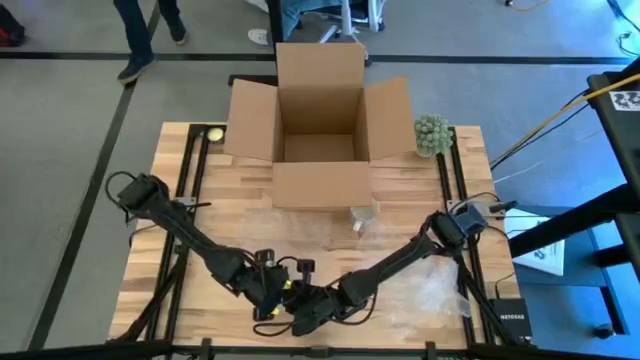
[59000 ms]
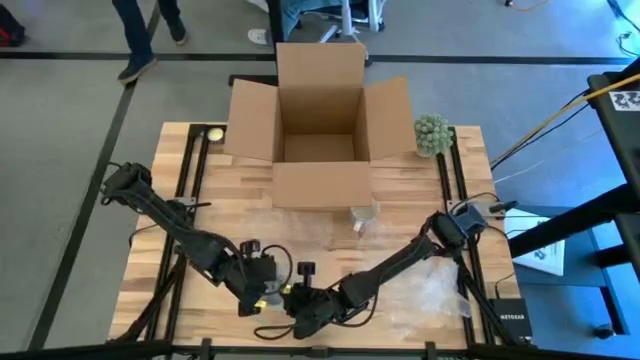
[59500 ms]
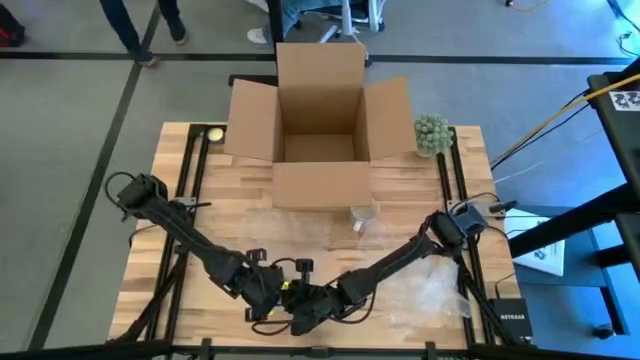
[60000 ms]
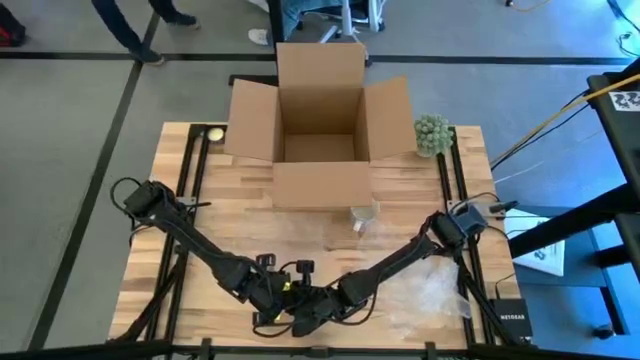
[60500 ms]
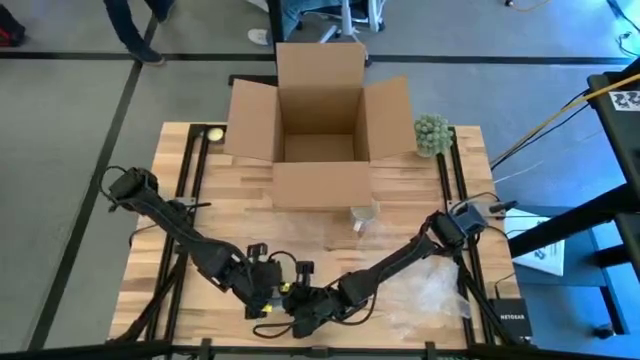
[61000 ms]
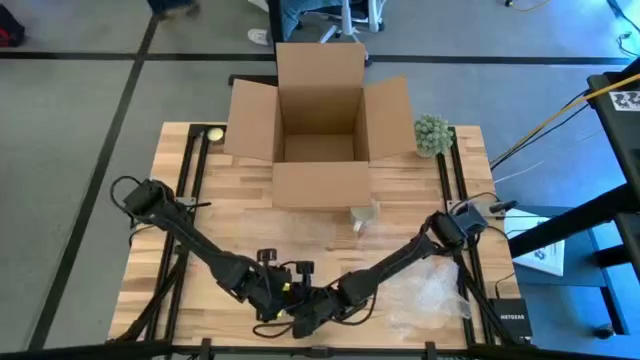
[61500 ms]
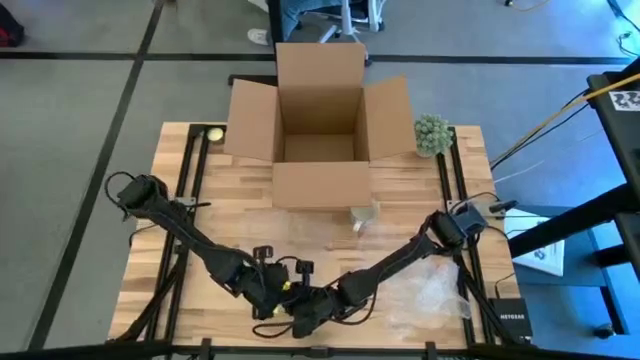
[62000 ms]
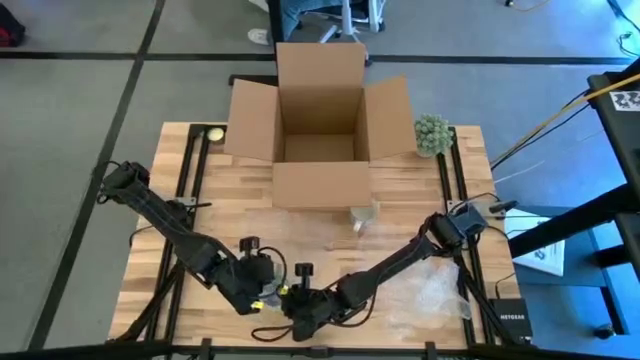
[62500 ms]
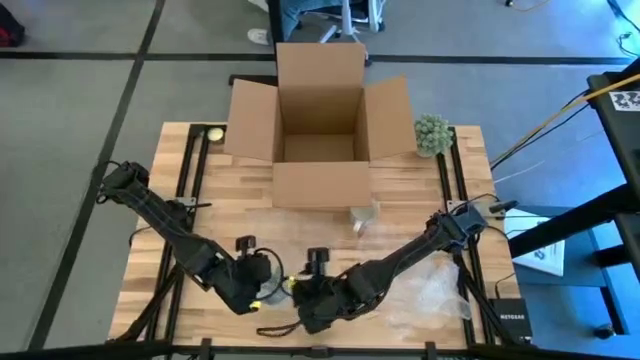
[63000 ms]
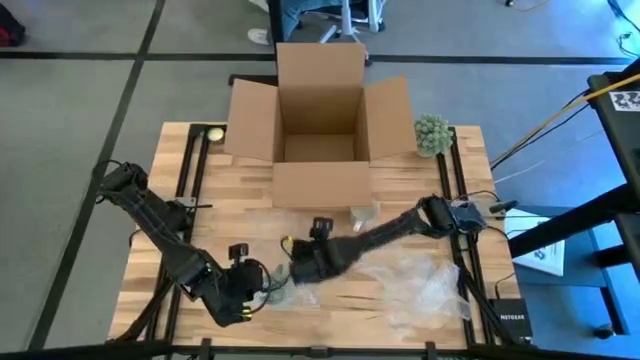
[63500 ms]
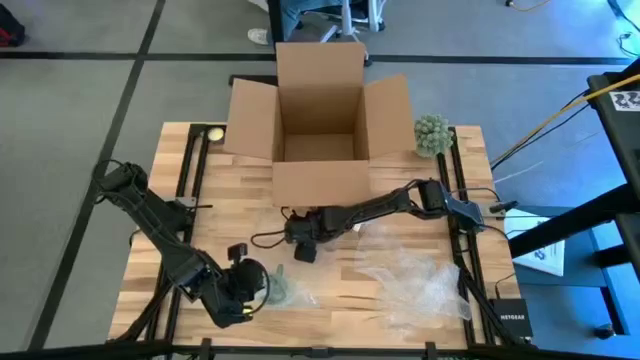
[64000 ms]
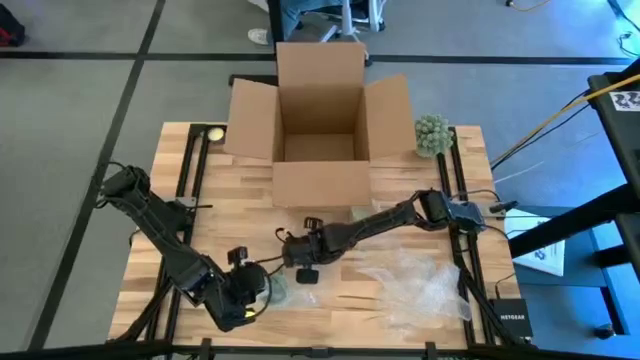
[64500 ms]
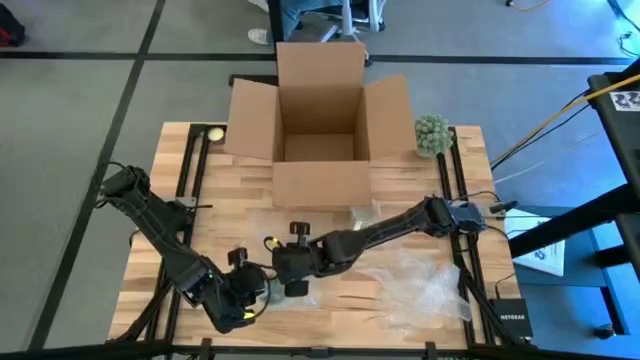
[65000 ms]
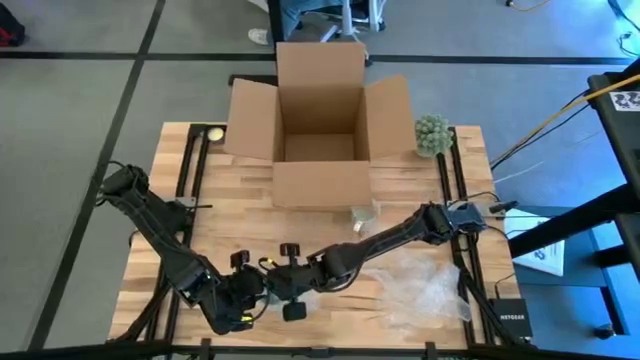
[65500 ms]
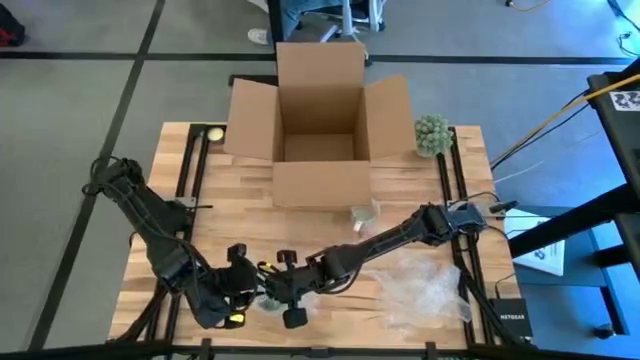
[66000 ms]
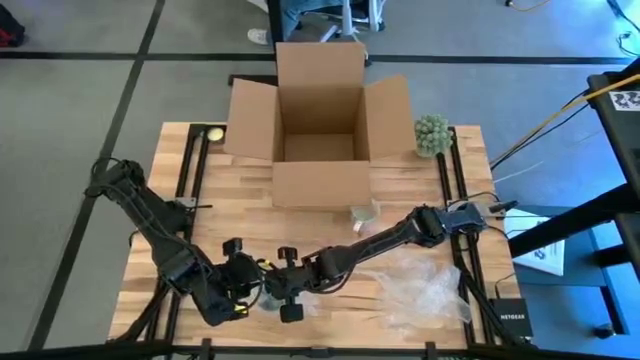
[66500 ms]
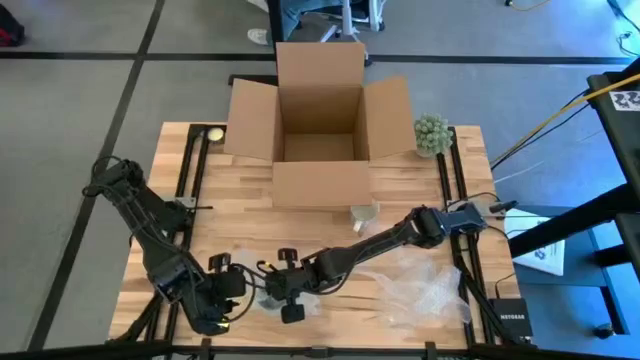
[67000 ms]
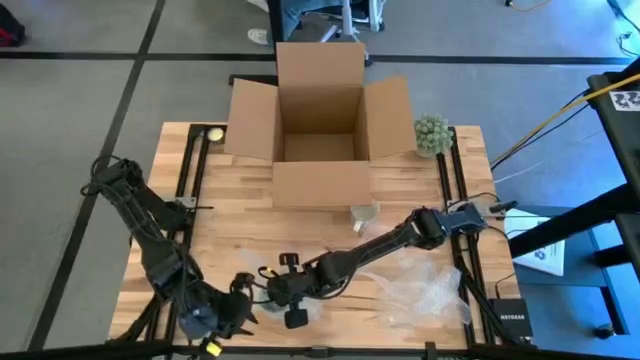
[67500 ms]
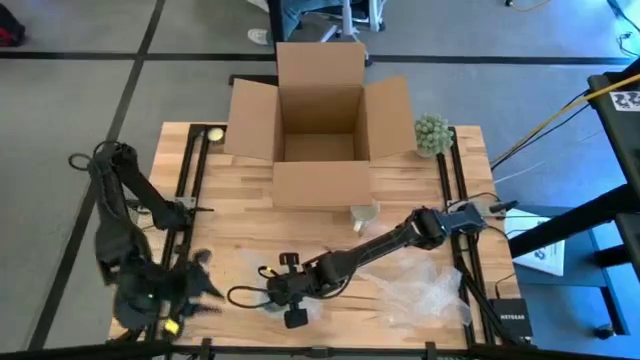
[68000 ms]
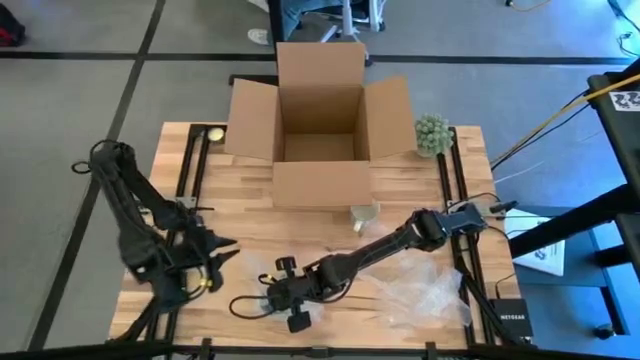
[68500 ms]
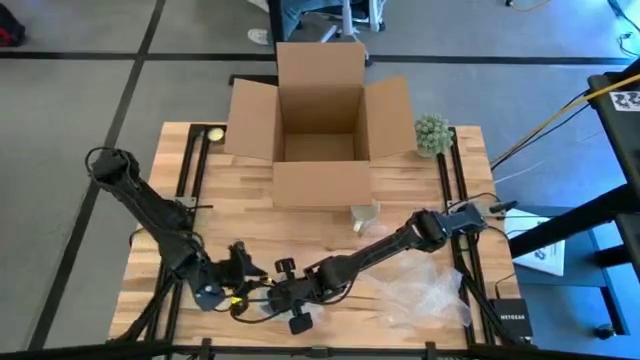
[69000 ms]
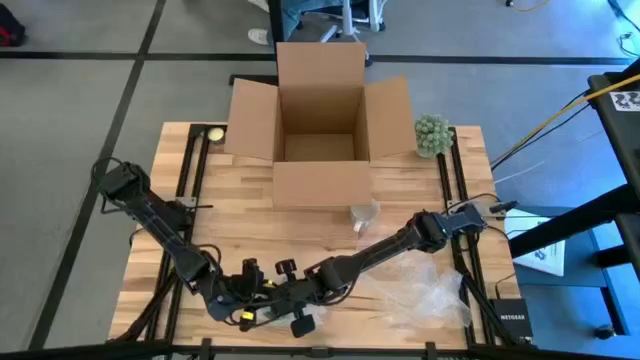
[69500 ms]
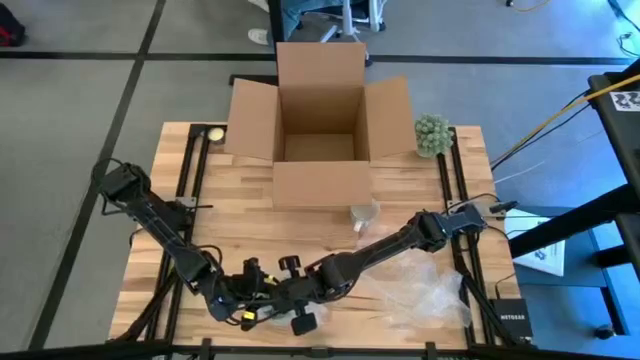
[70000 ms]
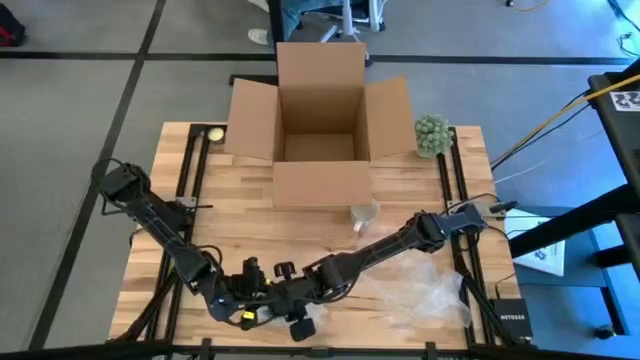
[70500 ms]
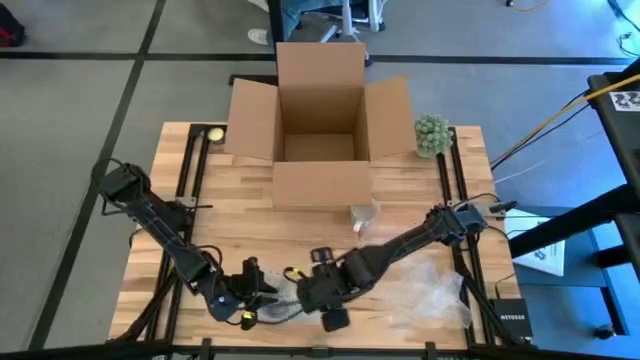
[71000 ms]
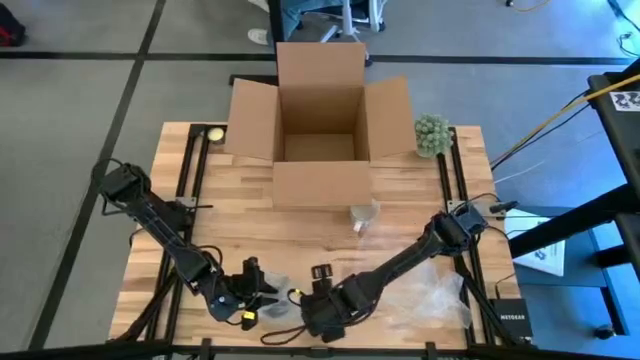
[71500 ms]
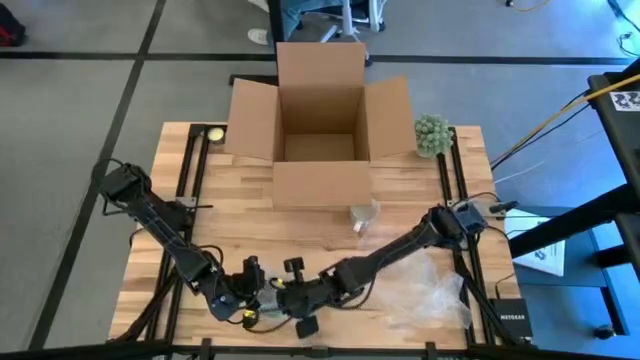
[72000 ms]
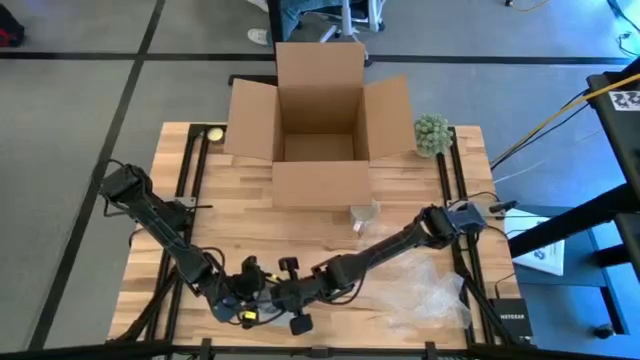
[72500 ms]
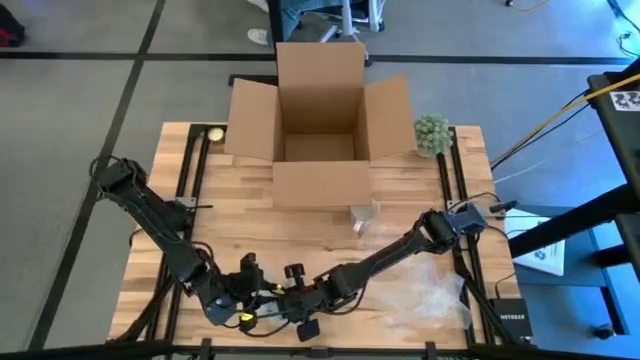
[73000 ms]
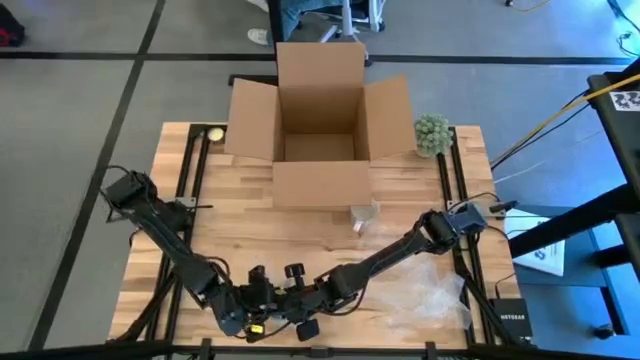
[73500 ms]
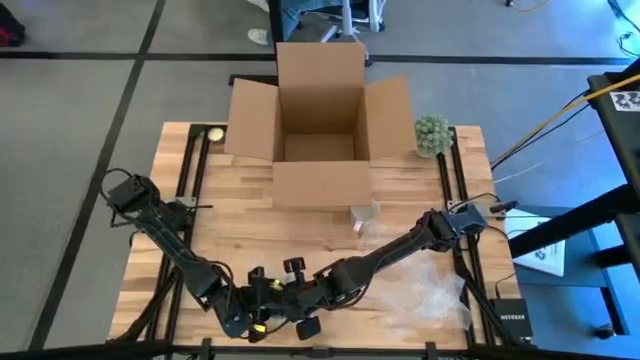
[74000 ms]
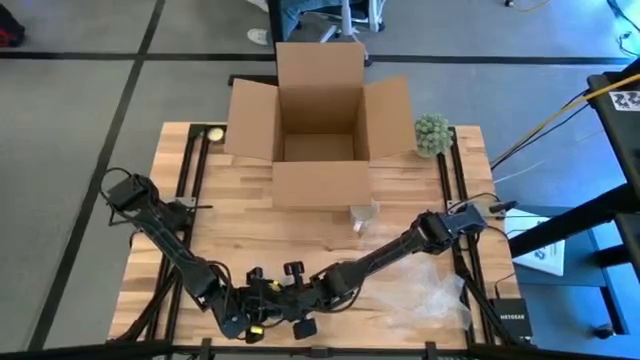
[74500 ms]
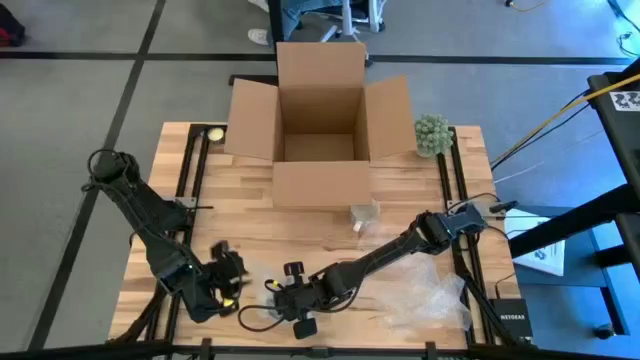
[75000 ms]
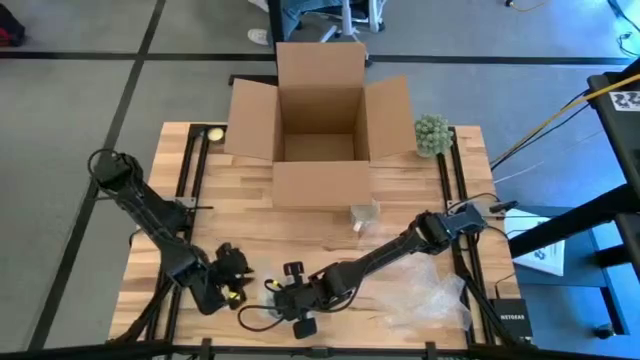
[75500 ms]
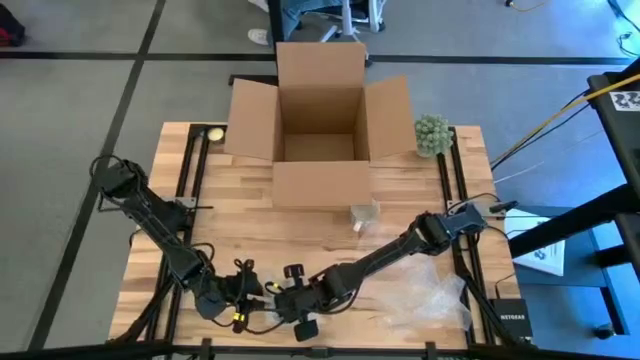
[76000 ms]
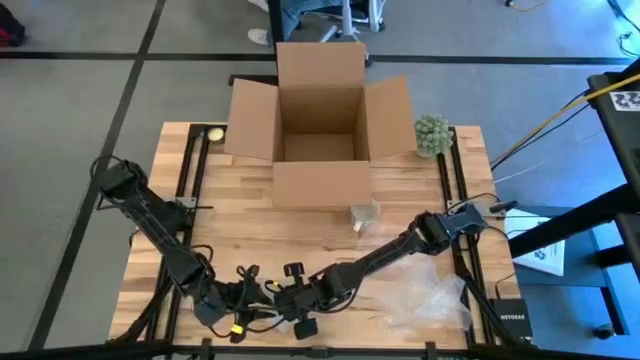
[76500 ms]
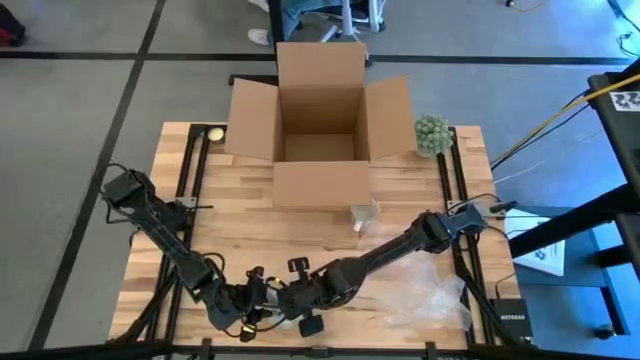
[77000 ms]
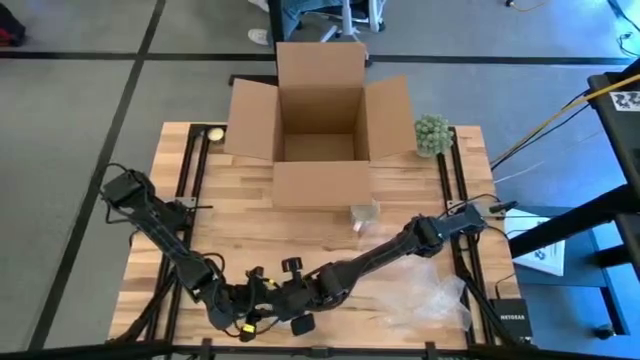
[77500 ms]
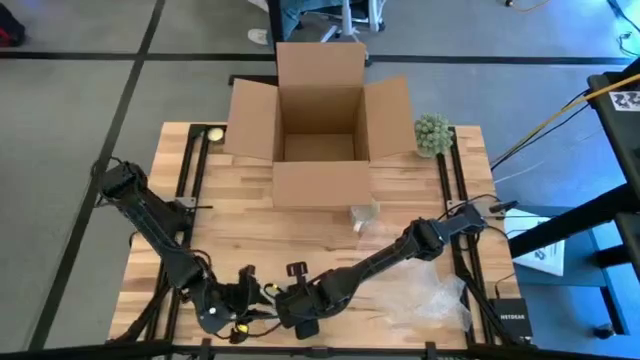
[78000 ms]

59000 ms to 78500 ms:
Task: wrap mug
Wrap the green mug with bubble wrap

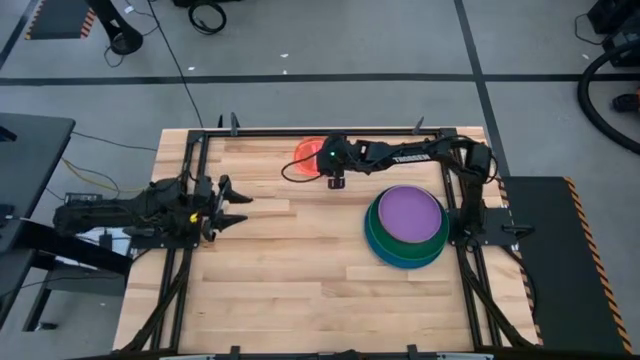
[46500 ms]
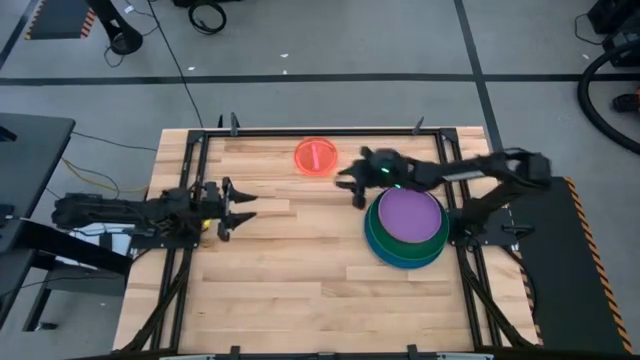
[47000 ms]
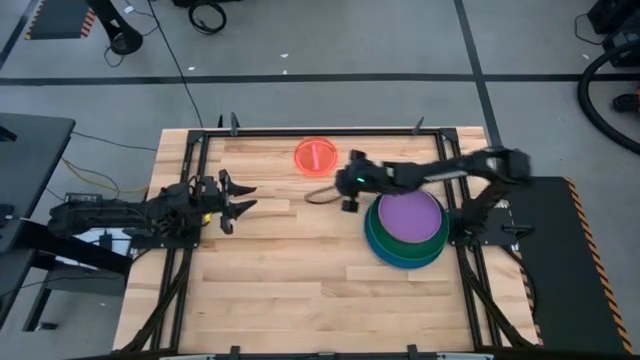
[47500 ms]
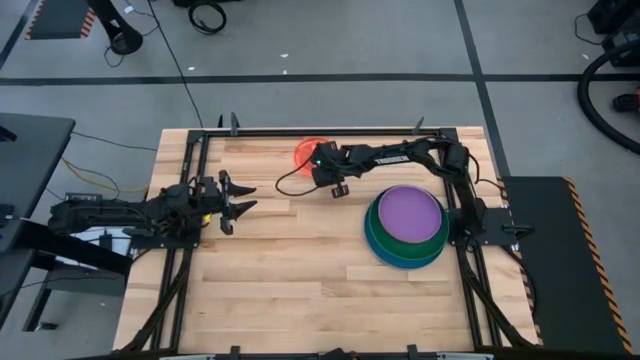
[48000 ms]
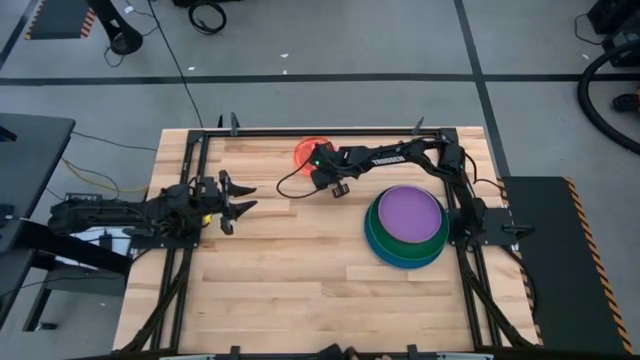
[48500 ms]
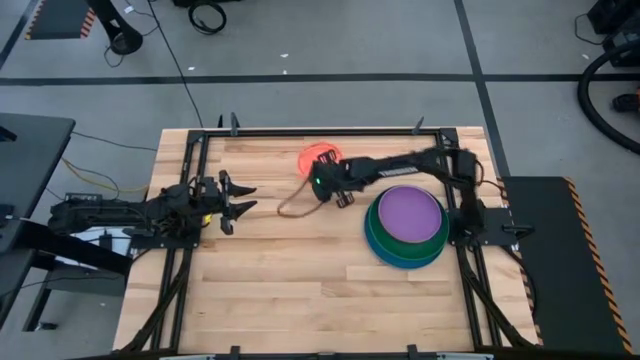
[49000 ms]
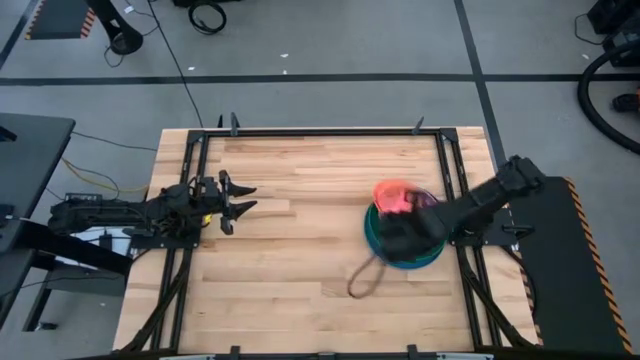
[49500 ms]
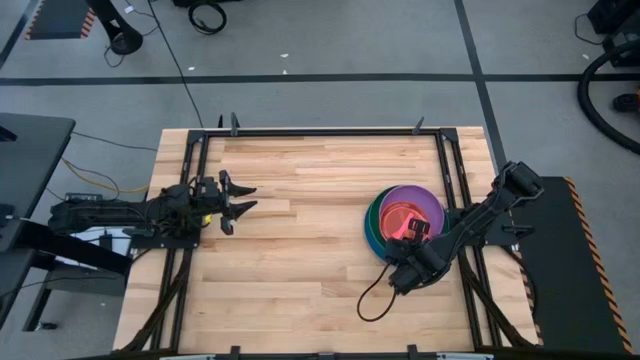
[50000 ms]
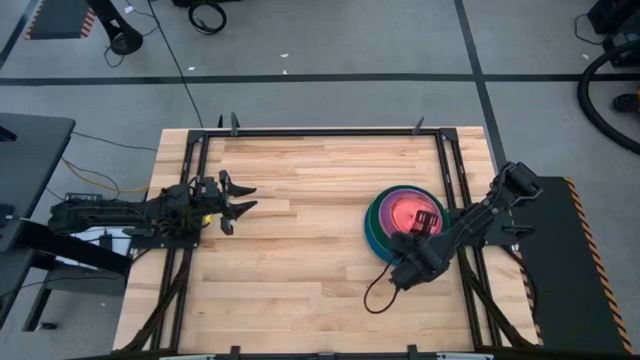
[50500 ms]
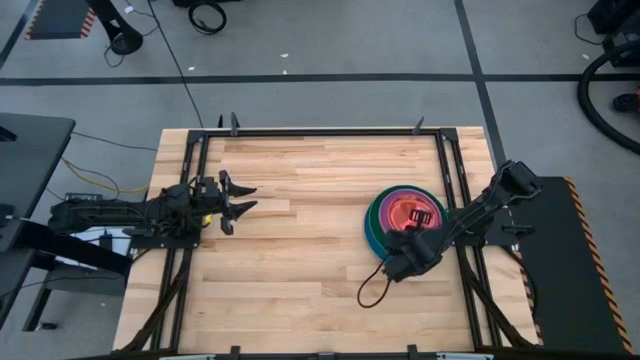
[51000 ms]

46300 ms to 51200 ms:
Task: Stack plastic plates
Stack the stacked pink light orange green plates on top of the purple plate
